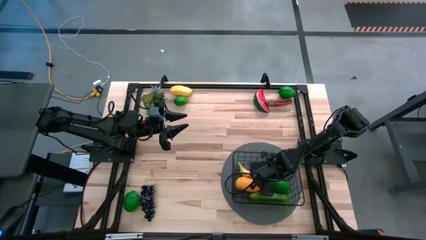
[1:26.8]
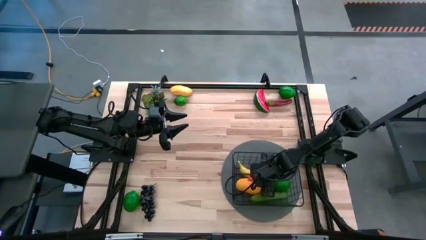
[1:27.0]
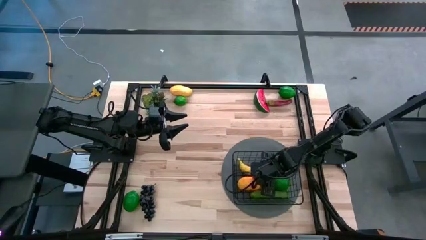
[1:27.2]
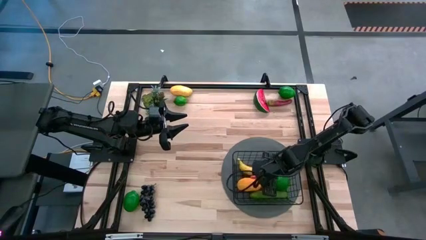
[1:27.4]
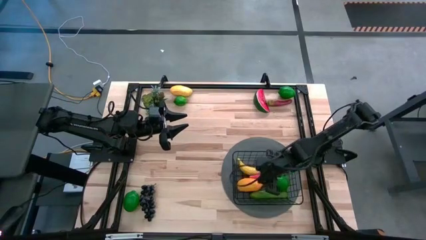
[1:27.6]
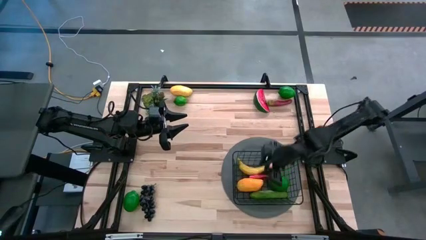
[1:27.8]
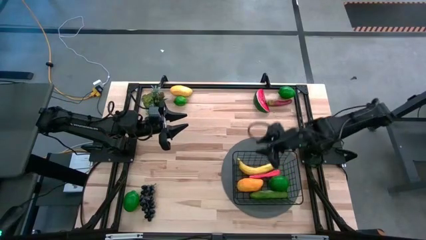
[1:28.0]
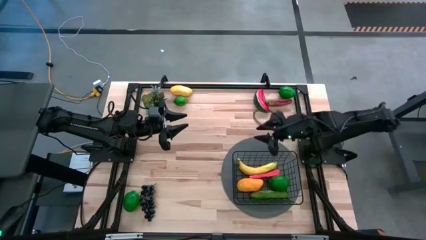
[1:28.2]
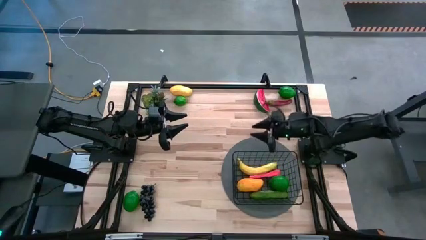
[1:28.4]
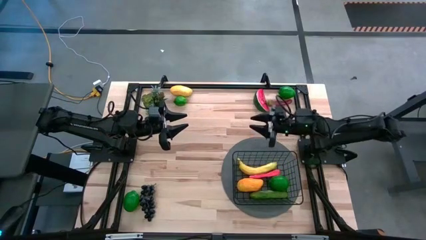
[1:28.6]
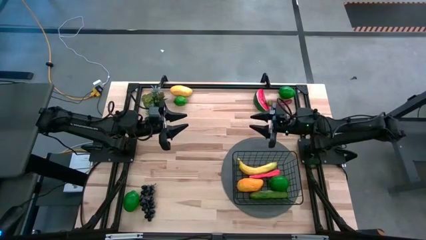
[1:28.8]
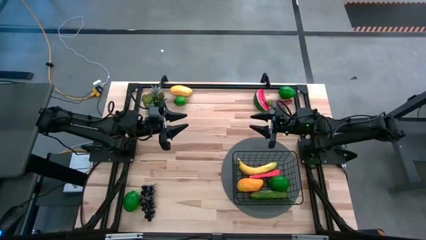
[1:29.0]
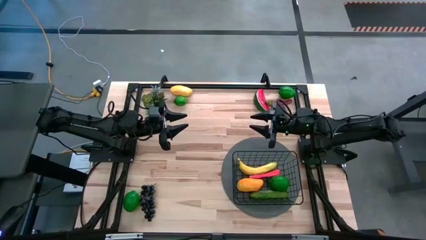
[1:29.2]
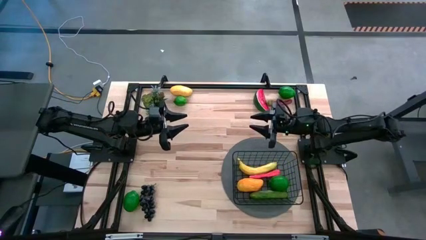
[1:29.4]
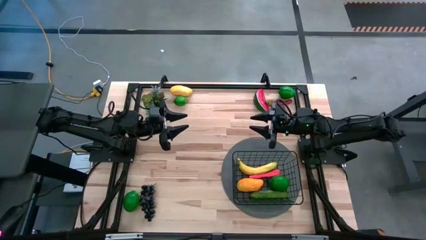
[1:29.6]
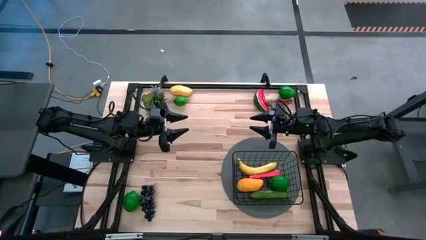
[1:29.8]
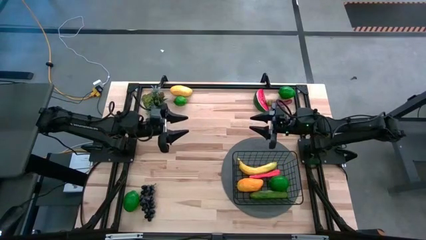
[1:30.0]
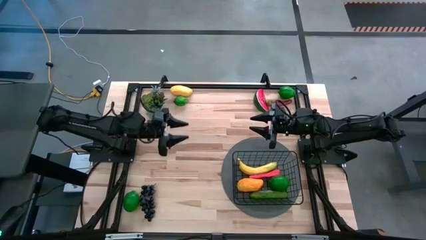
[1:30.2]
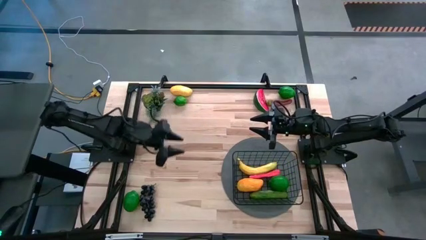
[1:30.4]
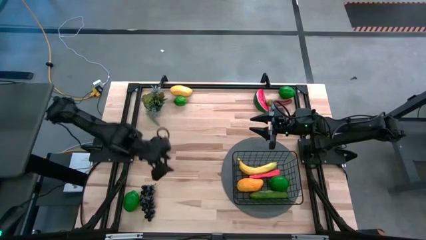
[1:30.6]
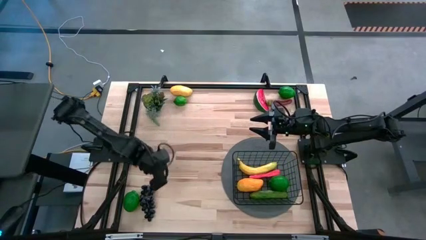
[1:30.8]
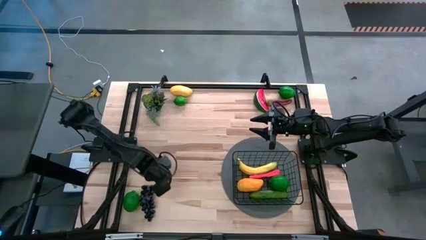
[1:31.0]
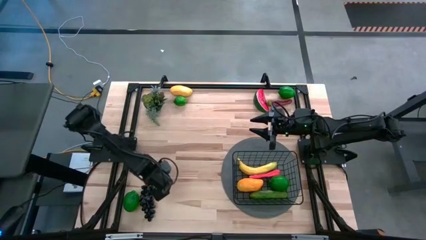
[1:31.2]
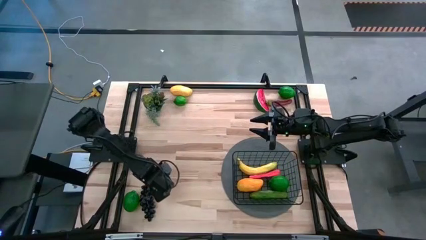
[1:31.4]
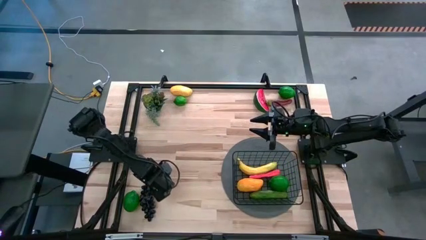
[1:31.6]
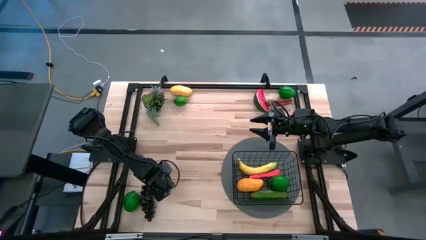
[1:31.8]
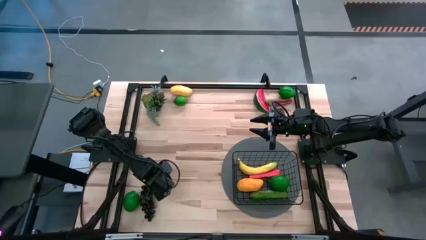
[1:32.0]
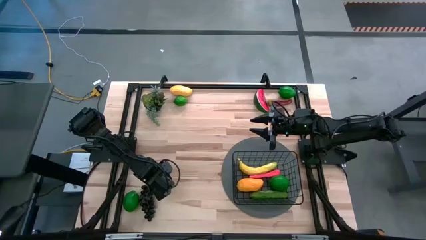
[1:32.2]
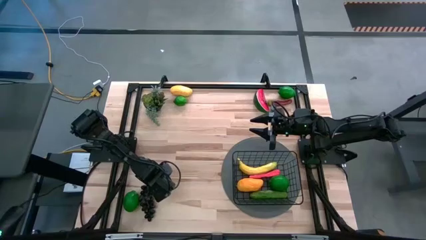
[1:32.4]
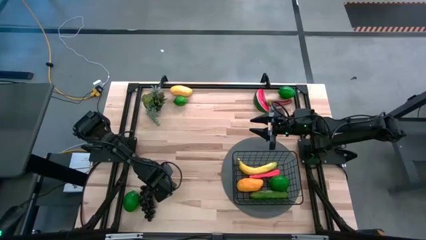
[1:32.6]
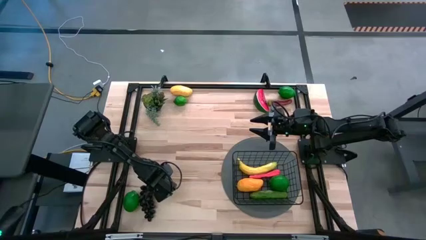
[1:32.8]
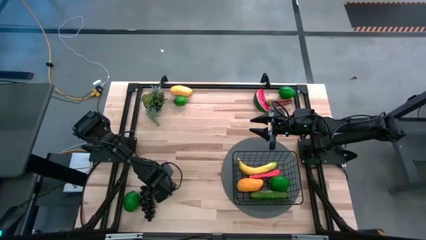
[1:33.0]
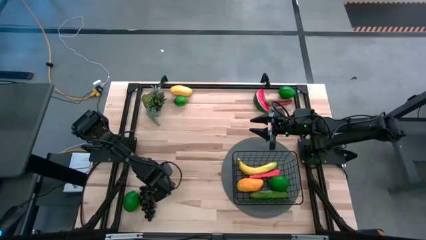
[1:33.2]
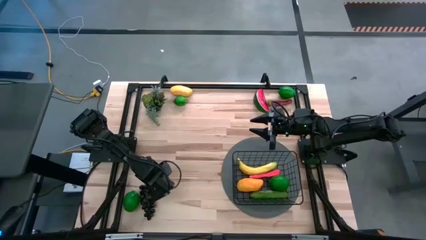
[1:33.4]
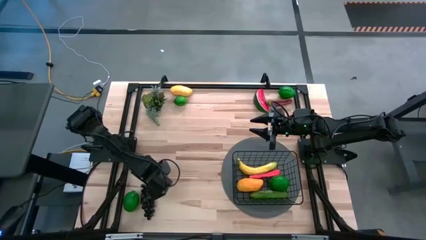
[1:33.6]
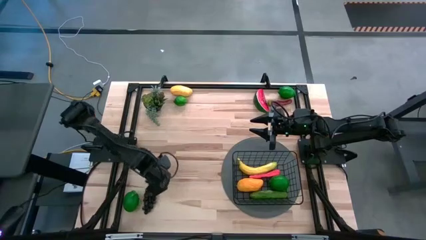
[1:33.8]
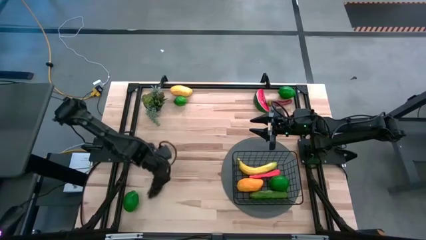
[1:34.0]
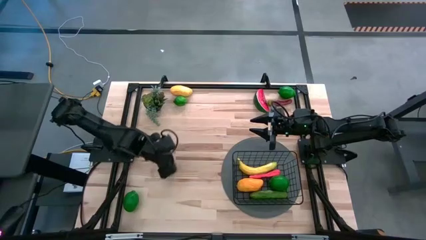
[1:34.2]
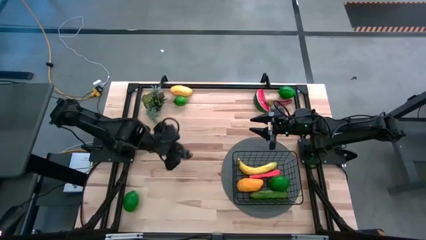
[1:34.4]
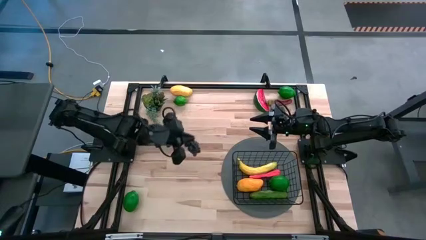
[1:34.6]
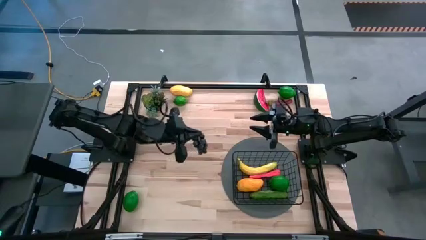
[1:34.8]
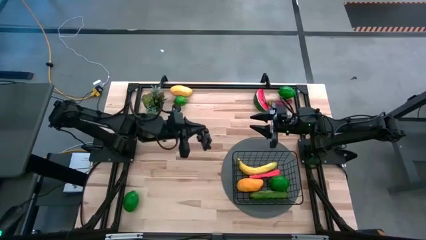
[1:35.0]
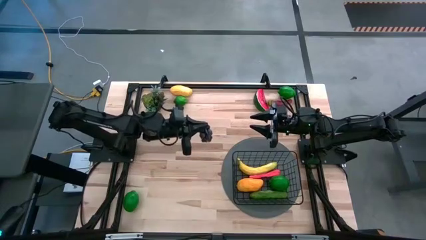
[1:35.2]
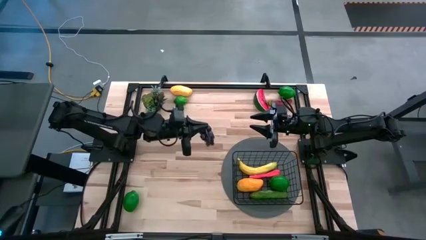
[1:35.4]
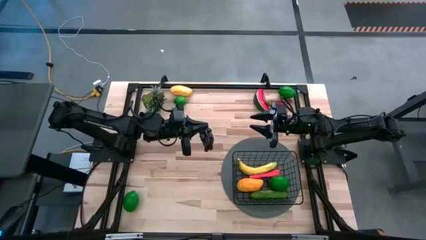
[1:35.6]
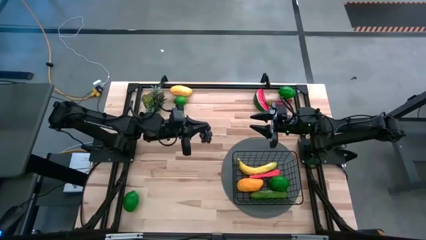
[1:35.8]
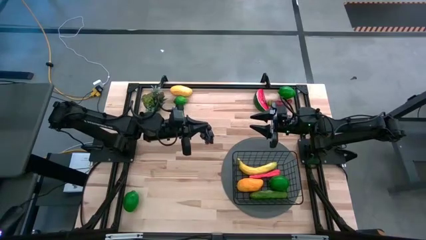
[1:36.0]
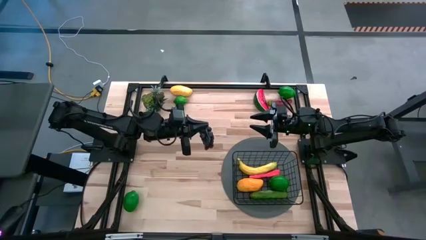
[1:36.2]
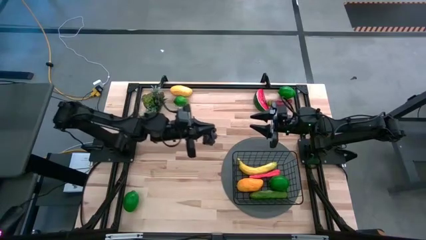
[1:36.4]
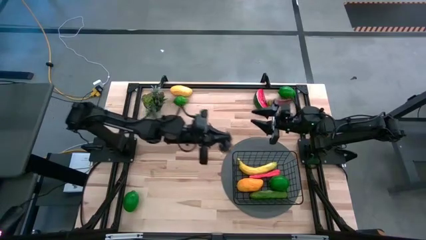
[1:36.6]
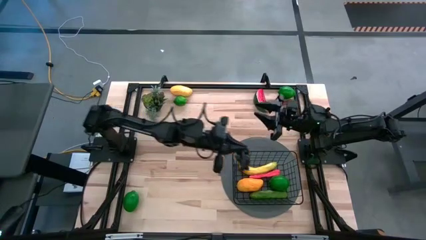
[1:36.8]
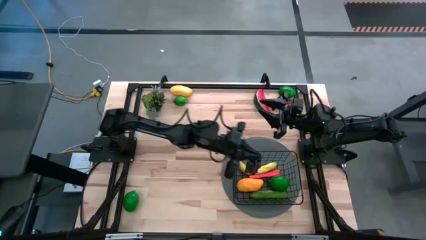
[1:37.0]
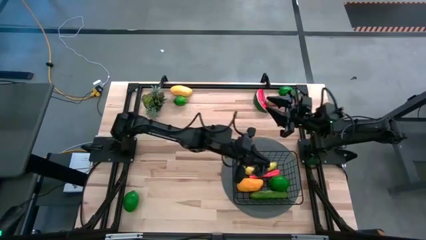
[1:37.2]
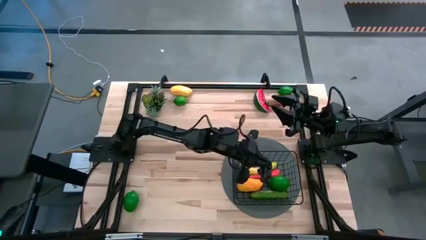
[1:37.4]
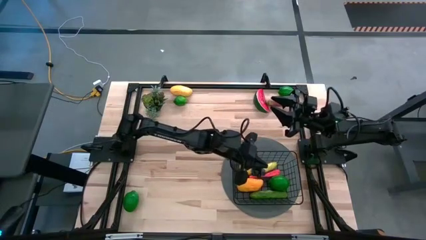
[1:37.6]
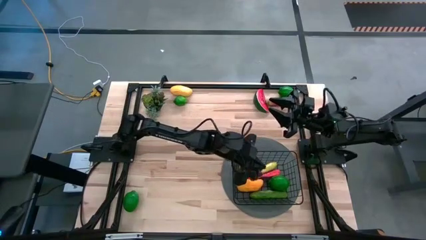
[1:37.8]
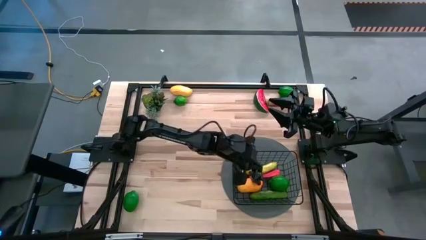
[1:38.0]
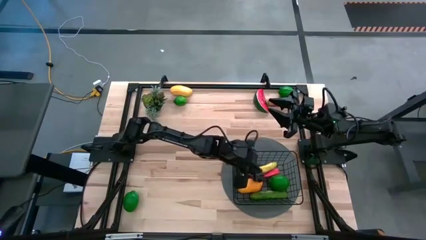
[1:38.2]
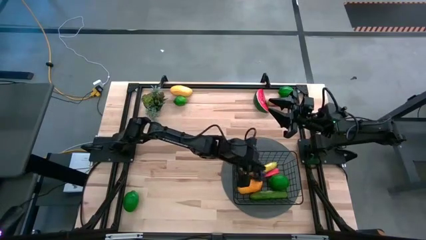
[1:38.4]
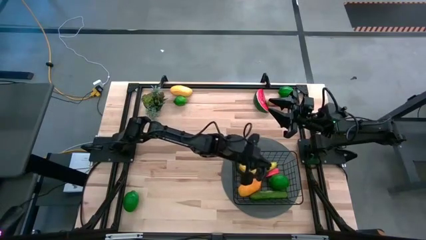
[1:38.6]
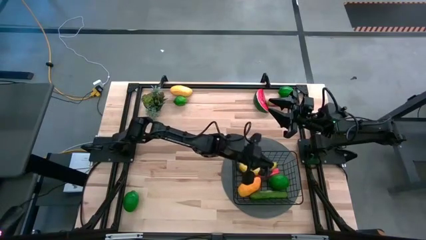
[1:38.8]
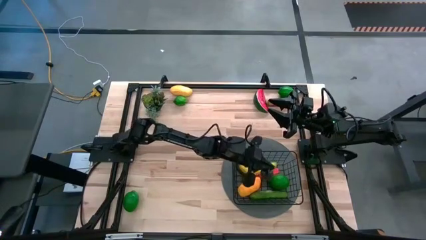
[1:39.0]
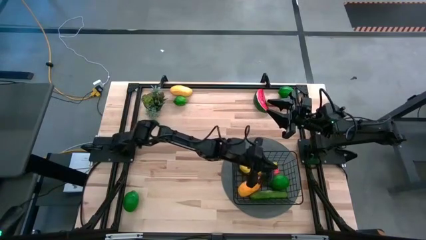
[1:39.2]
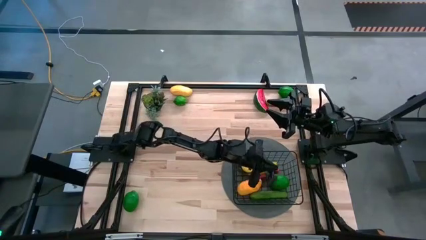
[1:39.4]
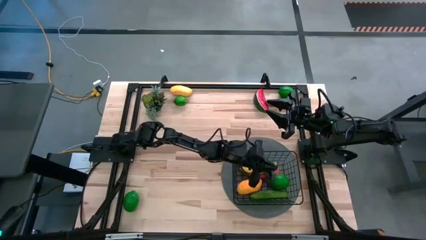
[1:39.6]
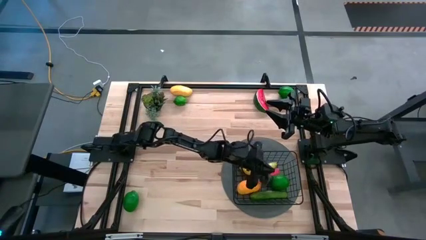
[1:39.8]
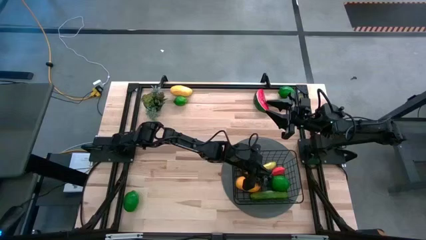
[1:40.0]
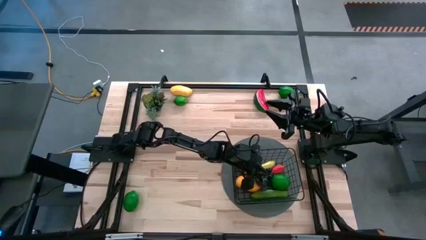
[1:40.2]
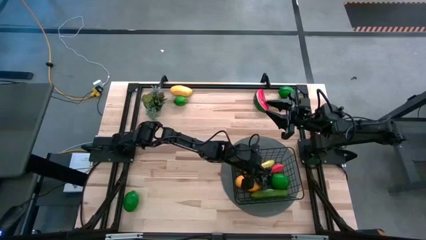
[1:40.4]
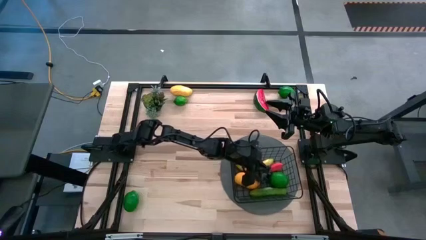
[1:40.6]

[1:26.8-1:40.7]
Task: Build produce basket
Put the purple grapes into the black basket

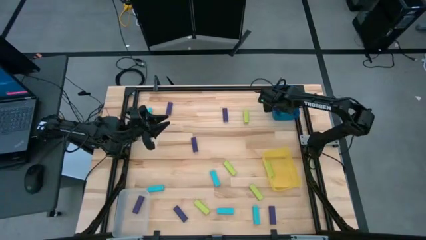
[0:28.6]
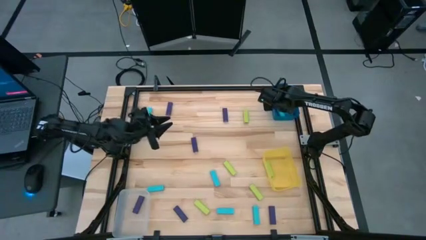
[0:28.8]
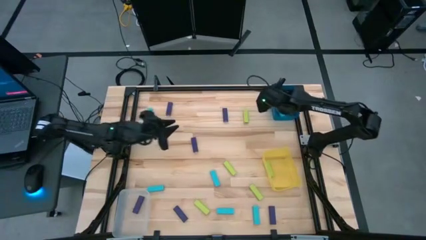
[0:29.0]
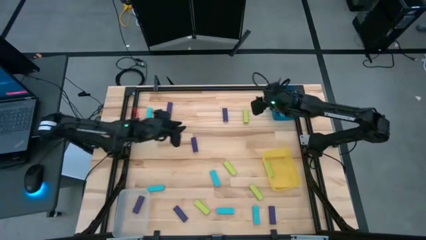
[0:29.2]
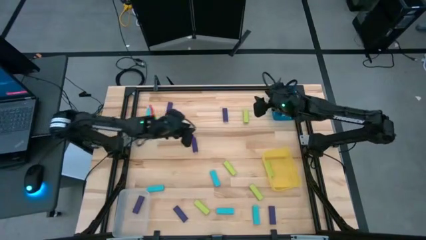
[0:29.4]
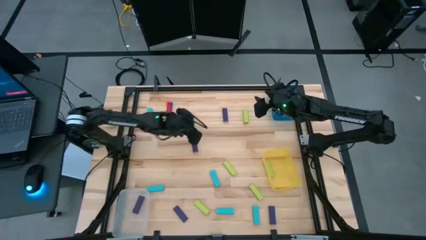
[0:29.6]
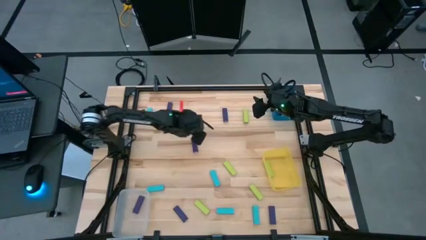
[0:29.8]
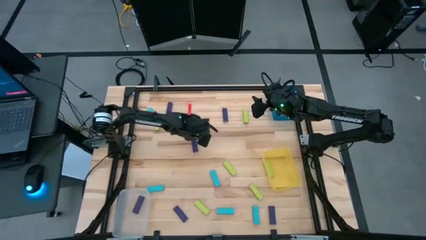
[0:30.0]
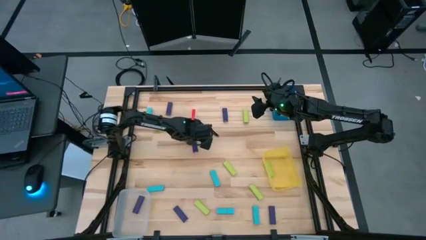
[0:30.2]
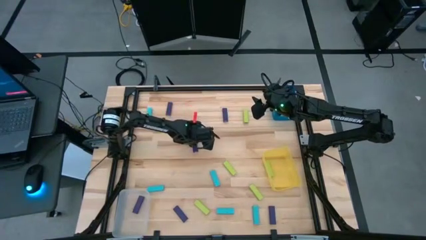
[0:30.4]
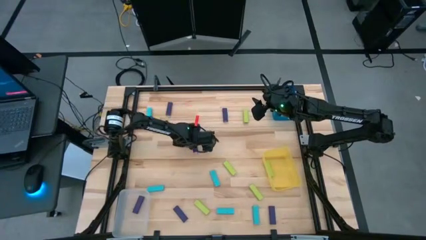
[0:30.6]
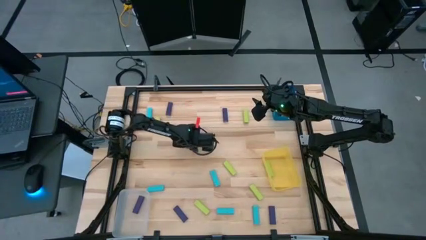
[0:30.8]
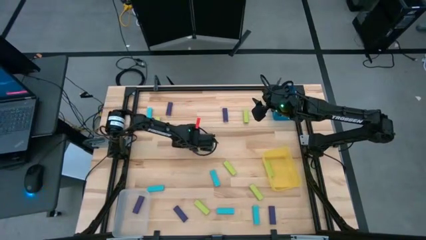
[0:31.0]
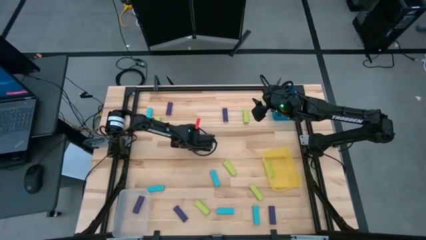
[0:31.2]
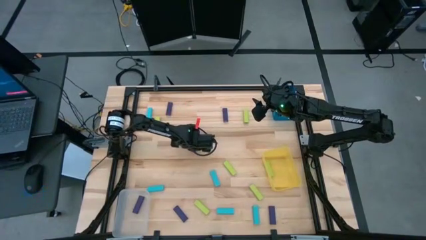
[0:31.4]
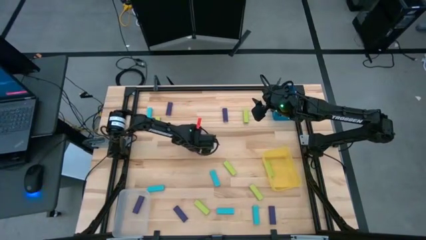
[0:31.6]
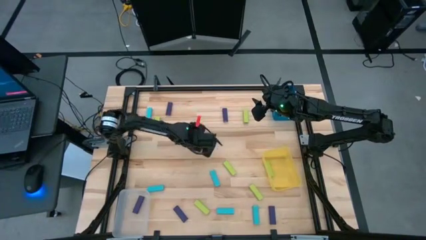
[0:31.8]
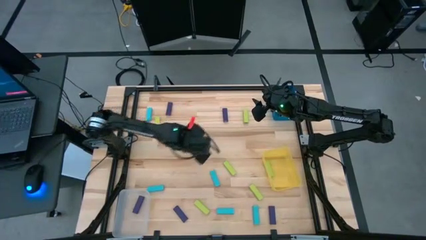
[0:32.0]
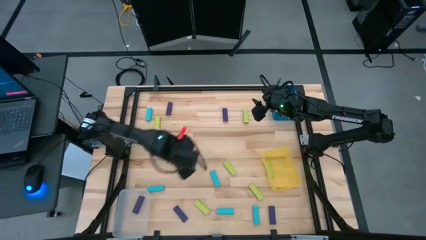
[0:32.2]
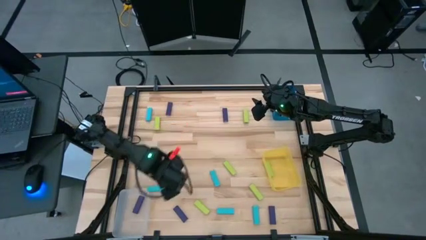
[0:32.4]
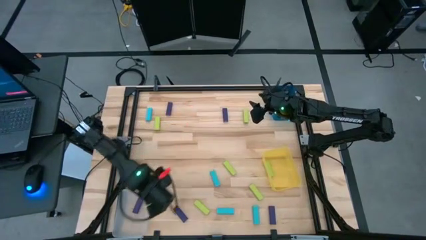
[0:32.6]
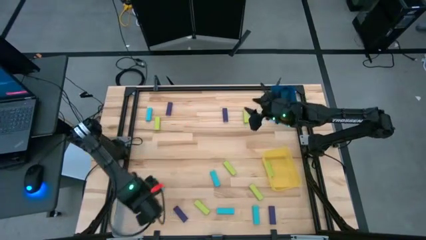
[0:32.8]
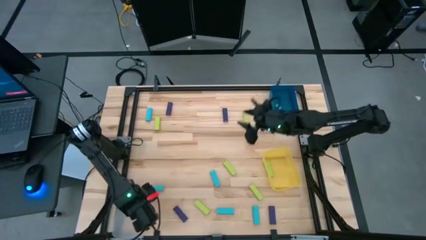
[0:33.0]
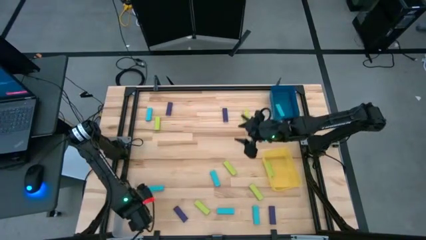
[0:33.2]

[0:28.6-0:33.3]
Task: Sort blocks
Put the violet block into the transparent bin
